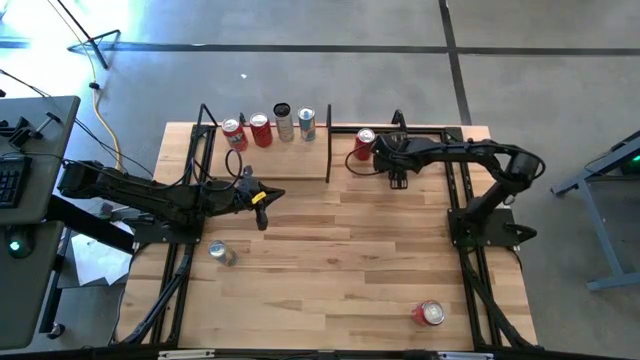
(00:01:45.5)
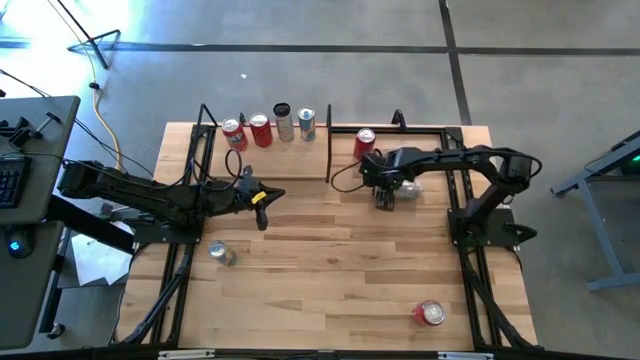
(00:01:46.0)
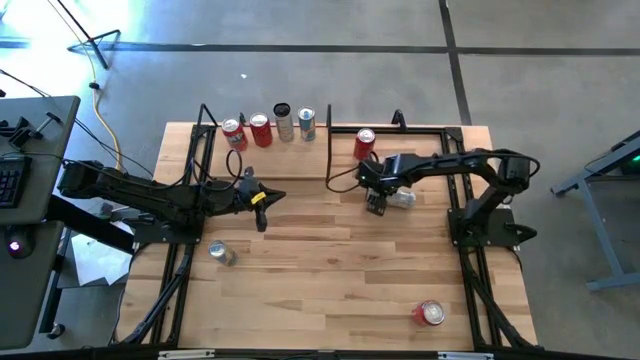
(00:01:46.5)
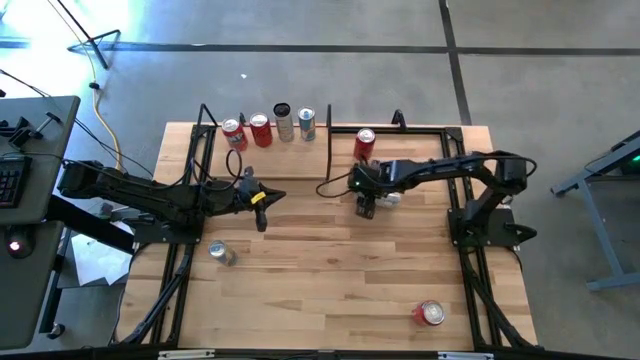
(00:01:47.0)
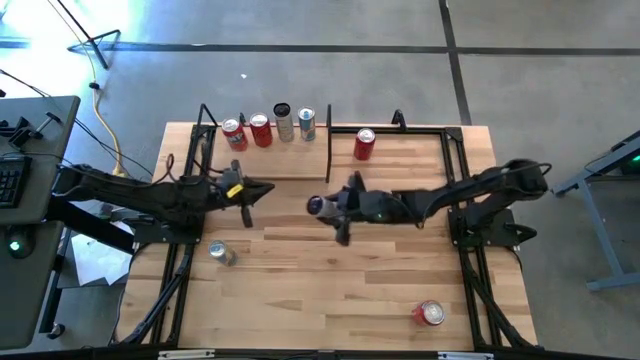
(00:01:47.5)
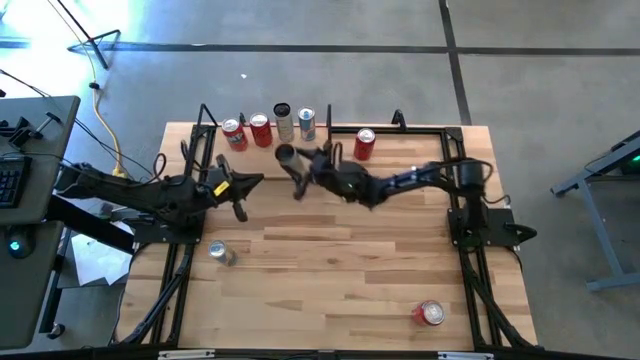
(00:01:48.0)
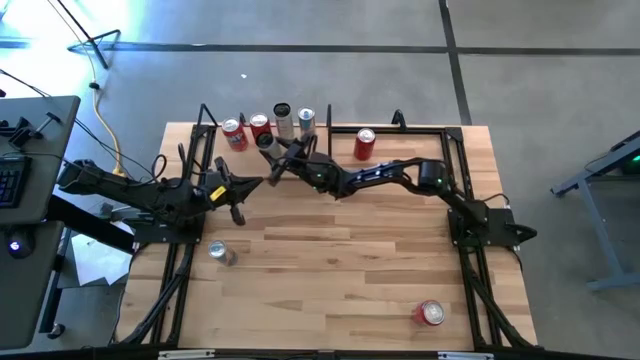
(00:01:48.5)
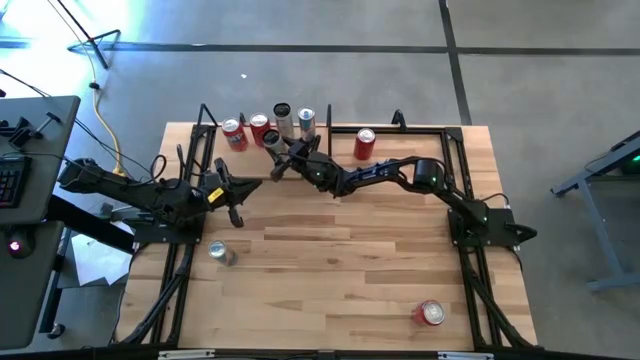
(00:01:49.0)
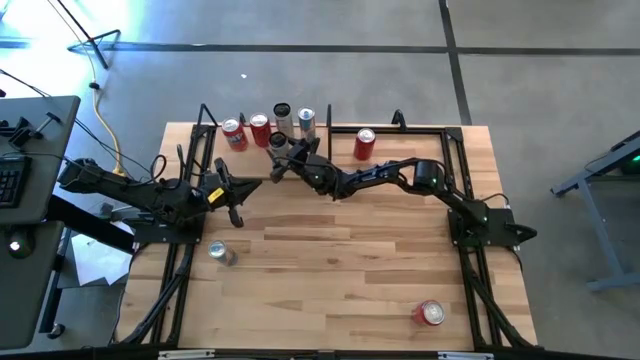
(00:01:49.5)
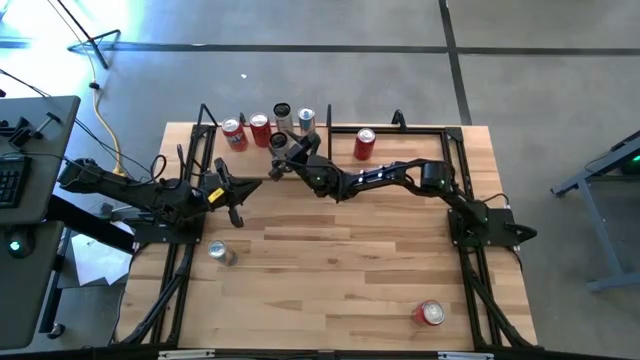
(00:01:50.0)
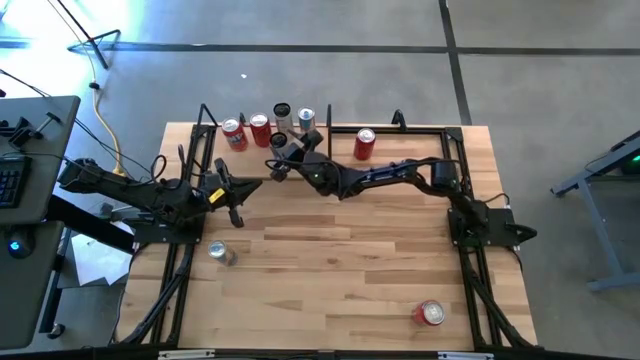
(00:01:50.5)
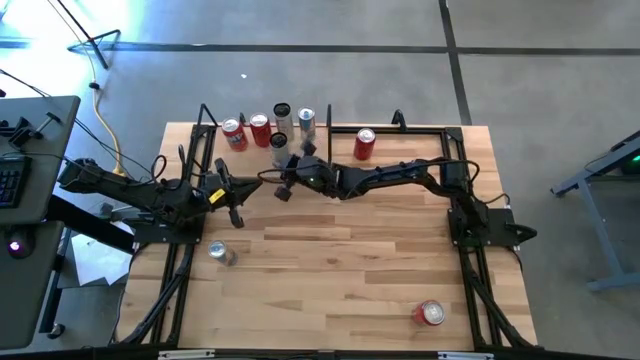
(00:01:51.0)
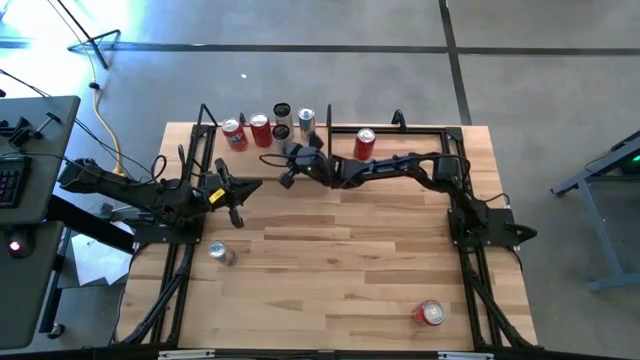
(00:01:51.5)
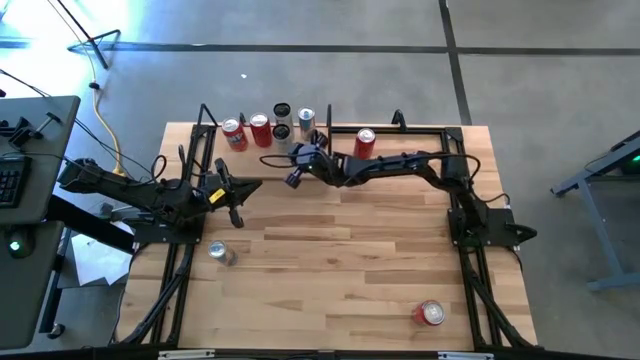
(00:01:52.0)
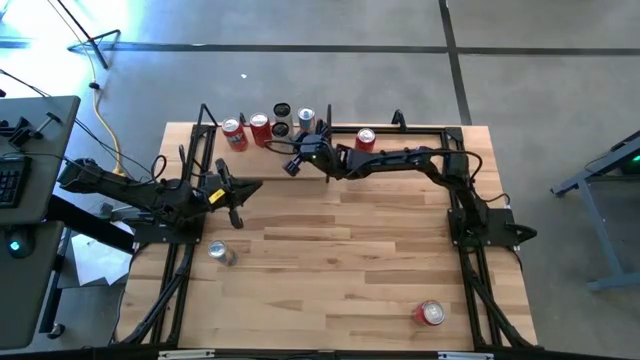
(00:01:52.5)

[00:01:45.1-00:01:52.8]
Task: Place canned beverage on shelf
Put the white-yellow soda can on the shelf aligned with the other white-yellow soda can

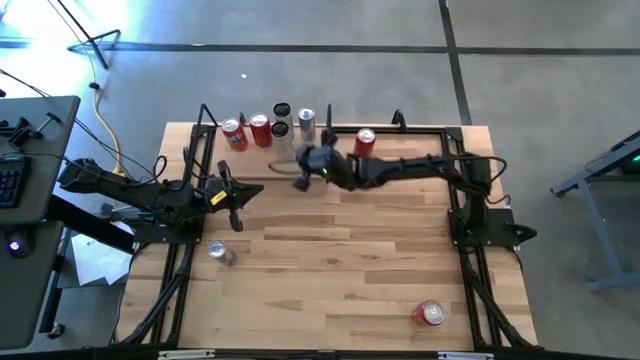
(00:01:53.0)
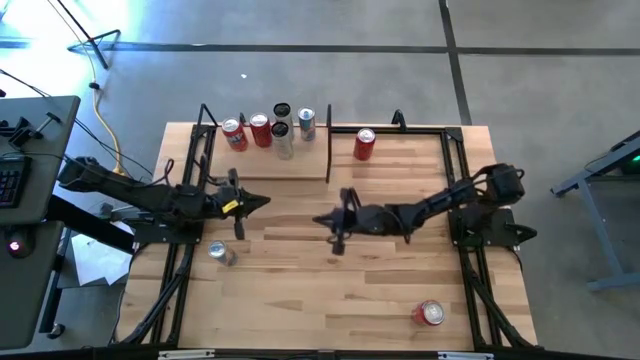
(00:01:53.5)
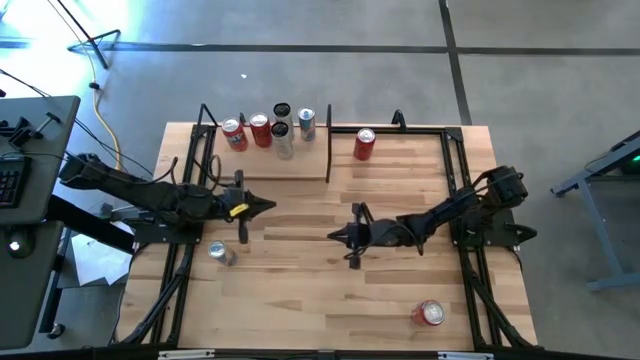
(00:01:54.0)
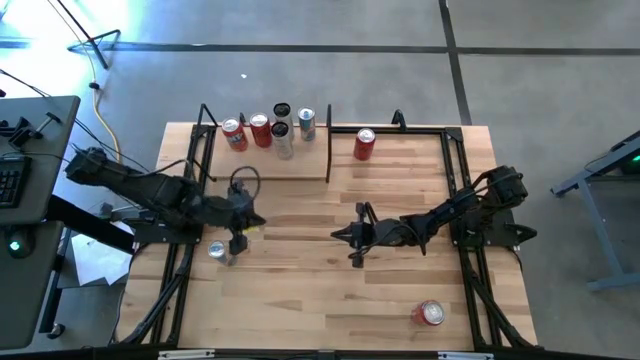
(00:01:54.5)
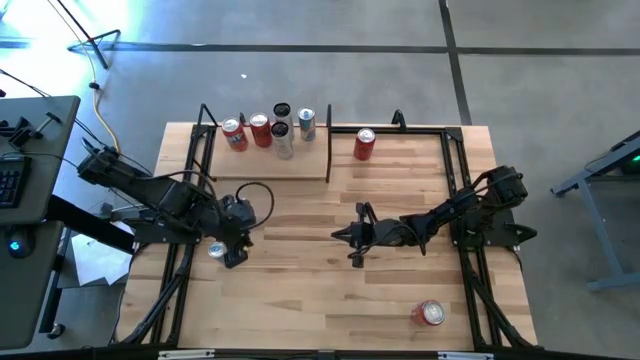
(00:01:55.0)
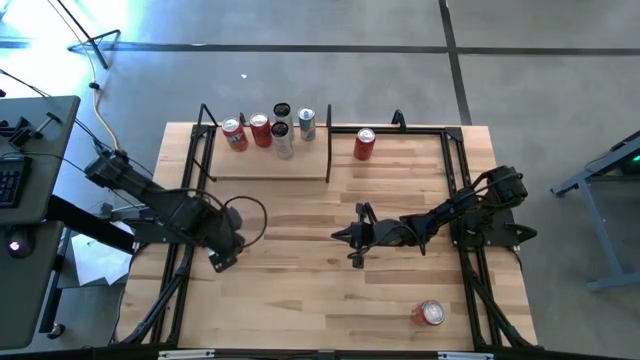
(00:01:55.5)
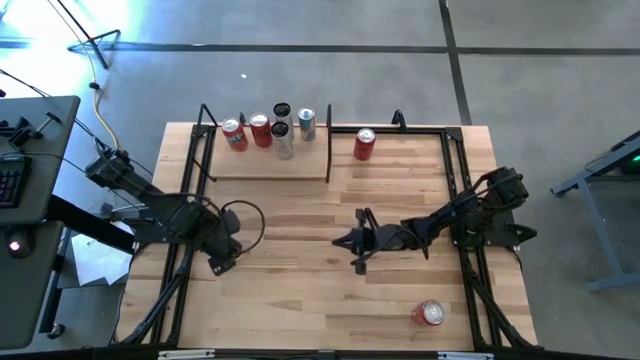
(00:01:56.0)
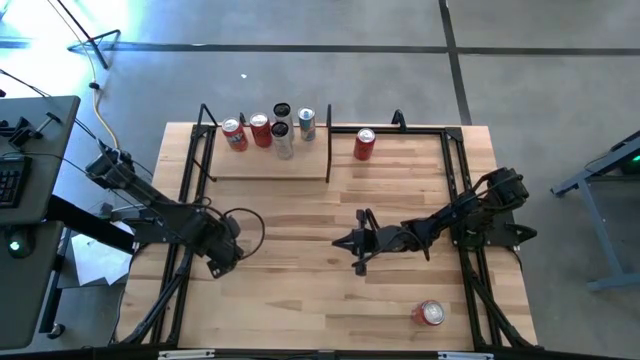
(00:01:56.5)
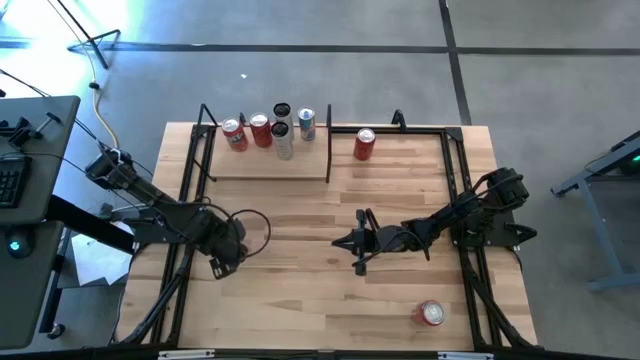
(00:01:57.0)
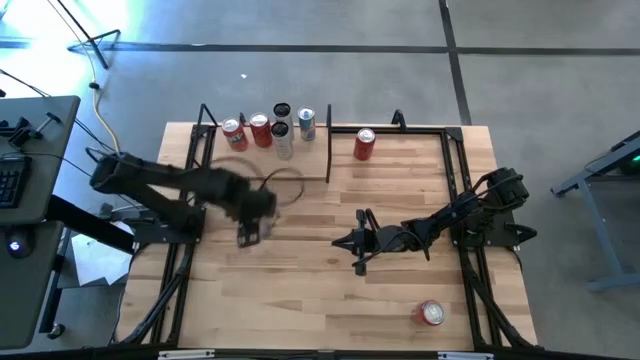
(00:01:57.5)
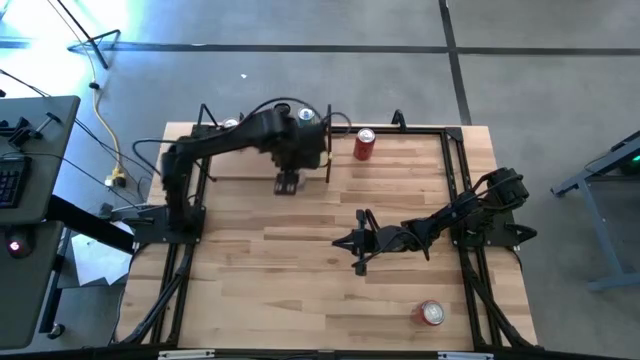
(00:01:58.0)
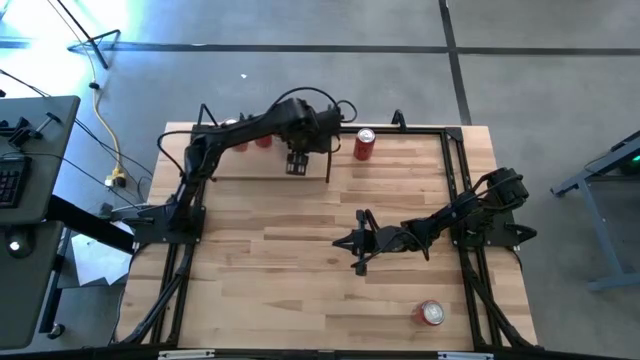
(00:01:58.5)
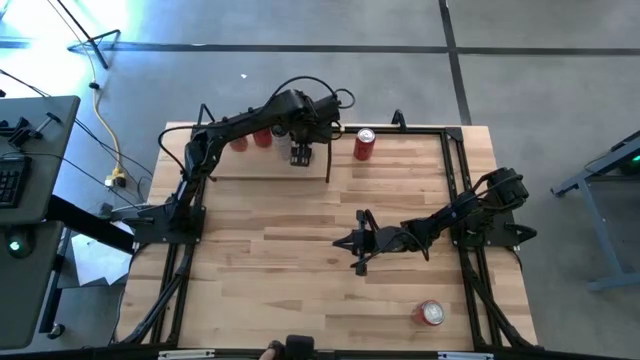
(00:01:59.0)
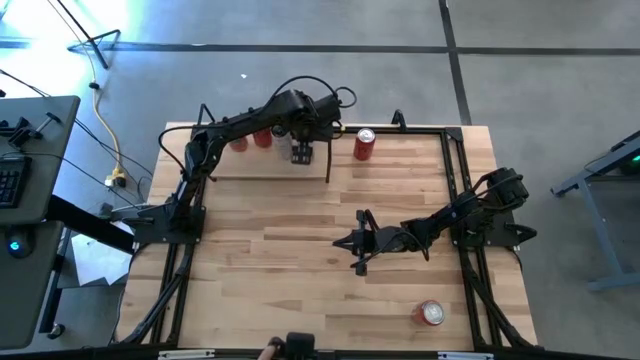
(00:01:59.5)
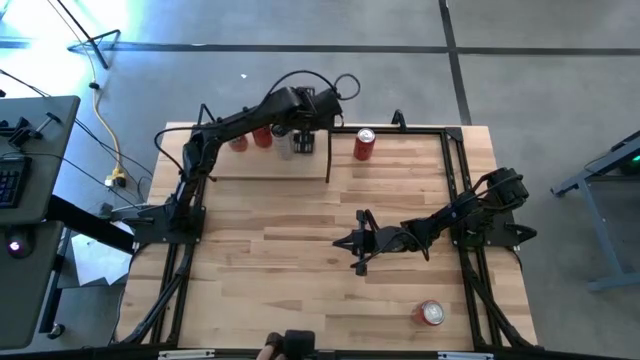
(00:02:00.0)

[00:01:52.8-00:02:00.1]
Put the blue soda can on the shelf aligned with the other blue soda can

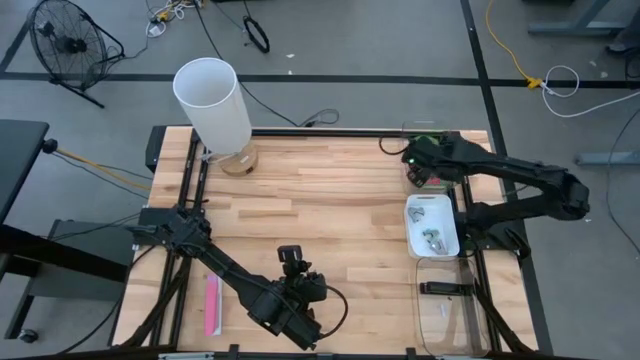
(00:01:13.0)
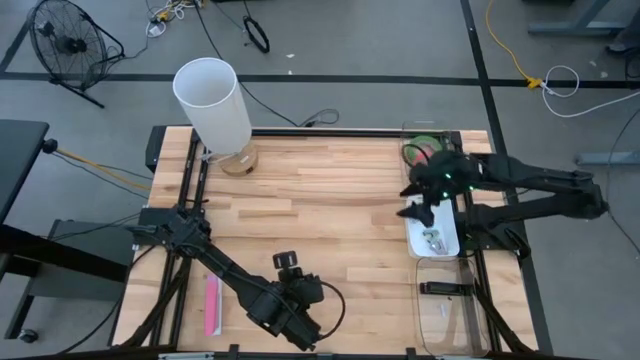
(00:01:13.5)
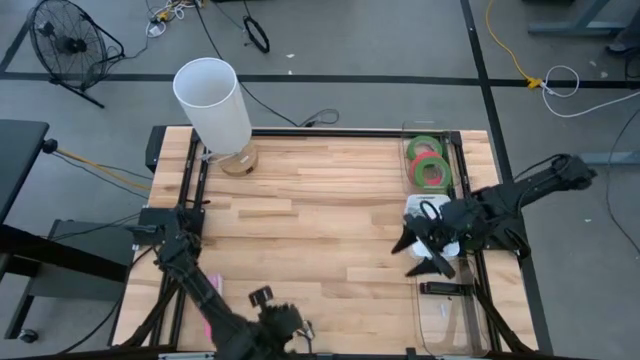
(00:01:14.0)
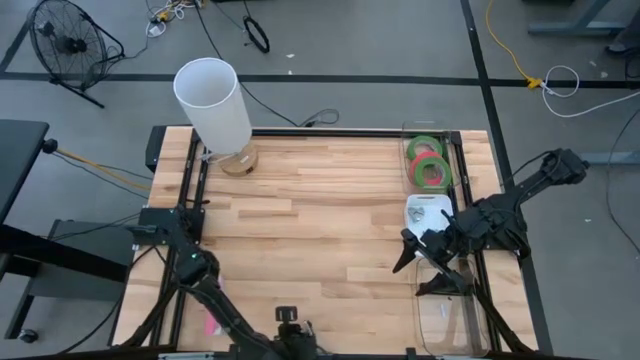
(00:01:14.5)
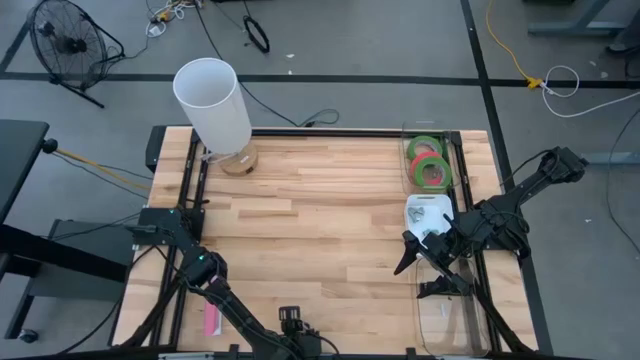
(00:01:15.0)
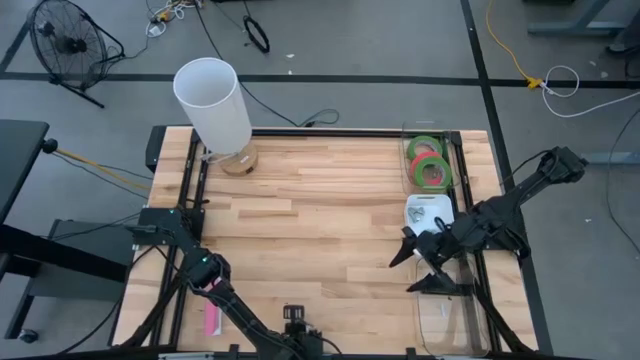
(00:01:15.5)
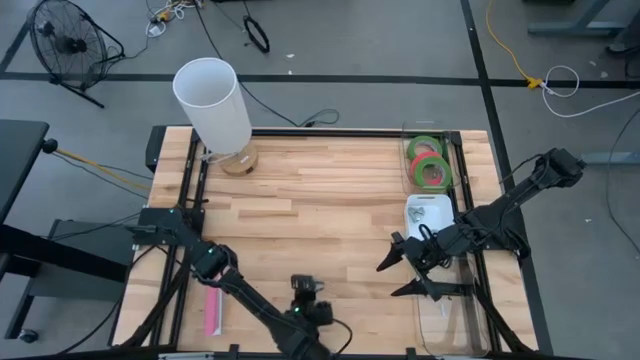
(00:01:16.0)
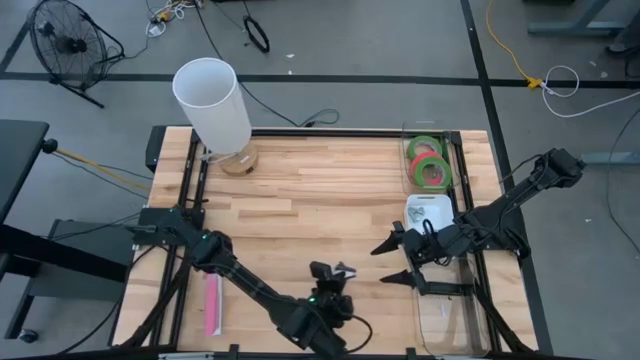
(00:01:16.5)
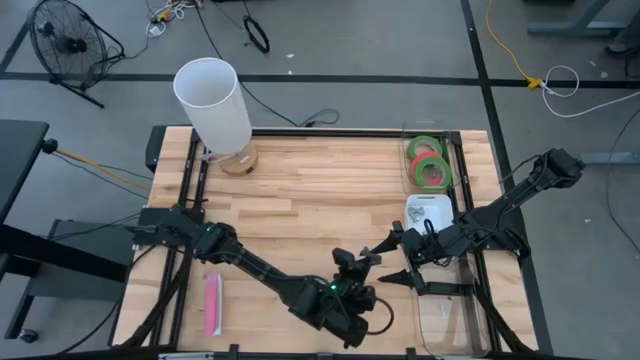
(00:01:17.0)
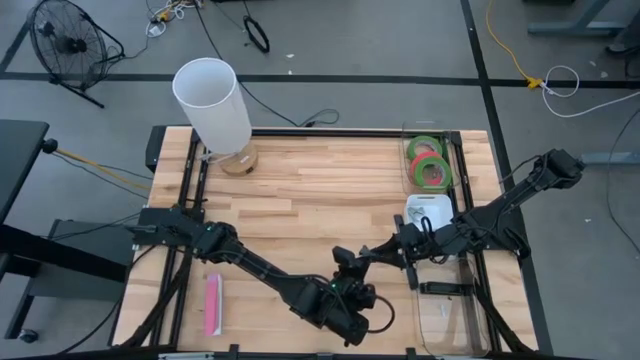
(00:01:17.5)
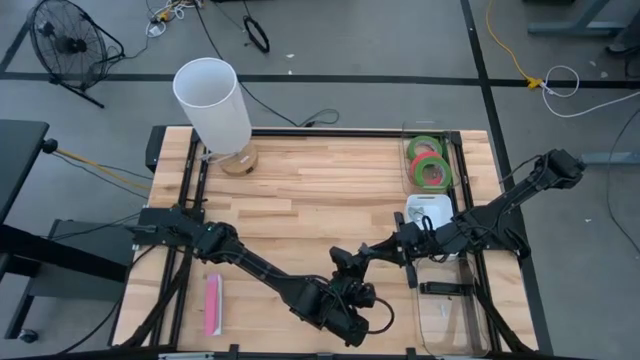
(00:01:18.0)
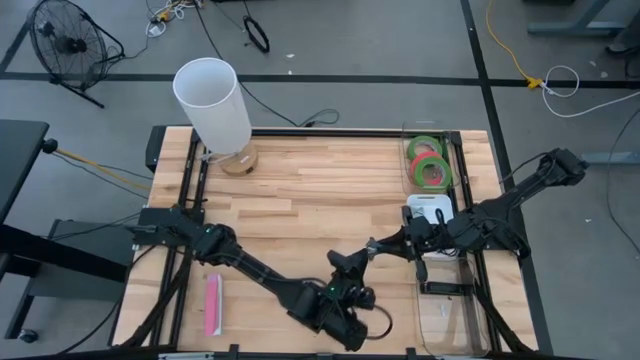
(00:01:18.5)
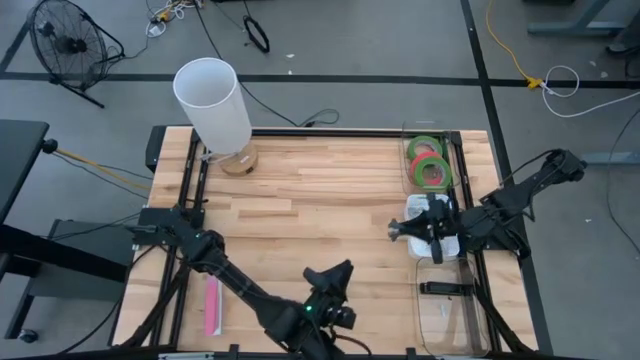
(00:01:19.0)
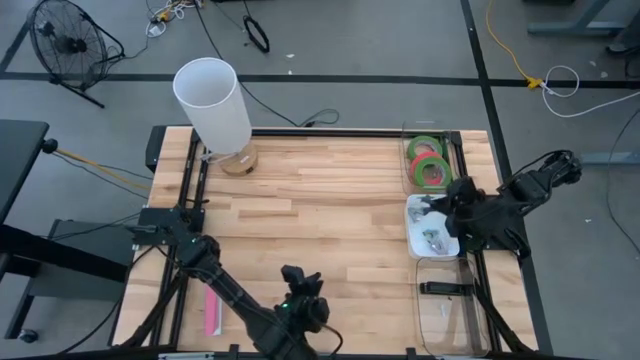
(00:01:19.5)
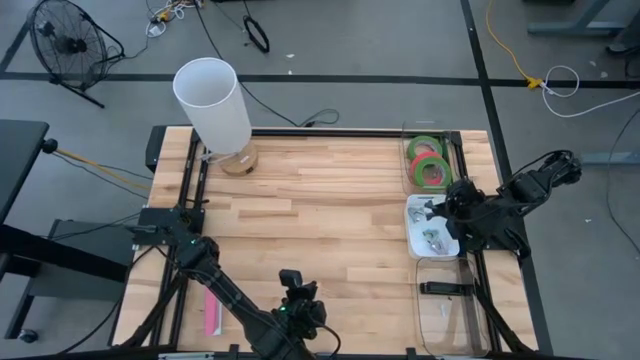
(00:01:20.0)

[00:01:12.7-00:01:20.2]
Task: Pick and place Stapler, Stapler remover, tape
Put the gray stapler remover into the white bin
